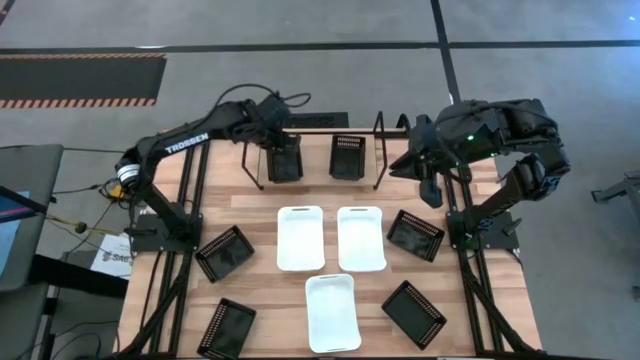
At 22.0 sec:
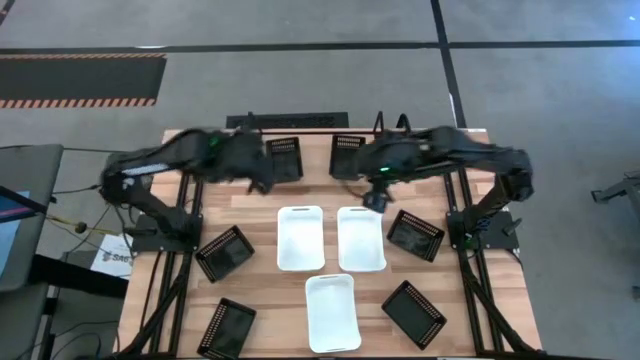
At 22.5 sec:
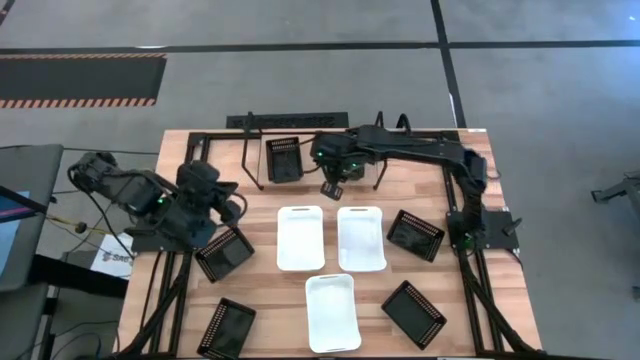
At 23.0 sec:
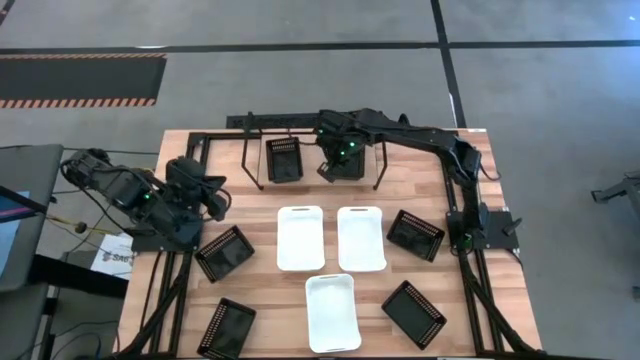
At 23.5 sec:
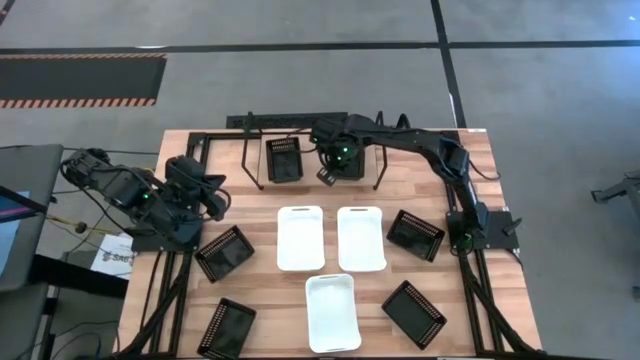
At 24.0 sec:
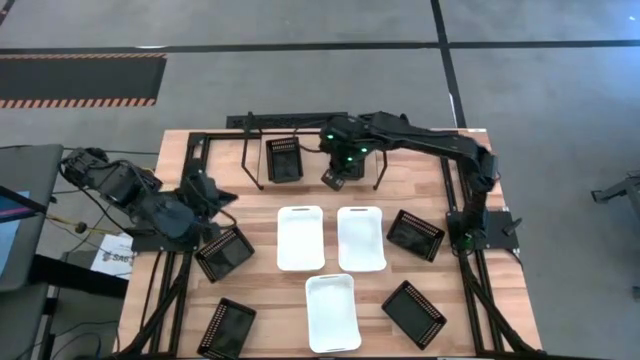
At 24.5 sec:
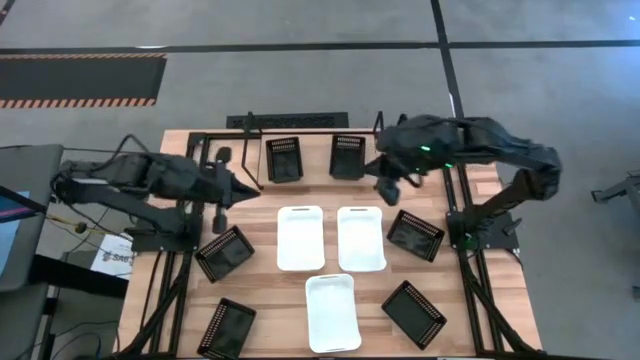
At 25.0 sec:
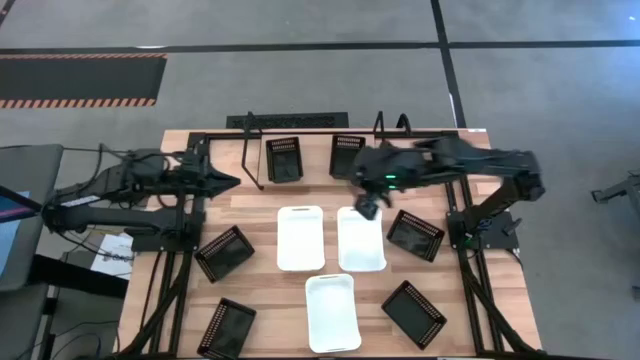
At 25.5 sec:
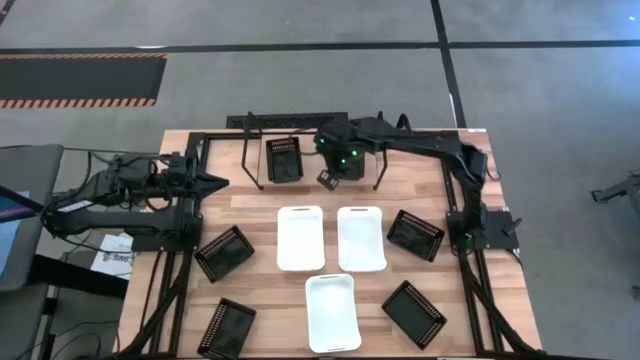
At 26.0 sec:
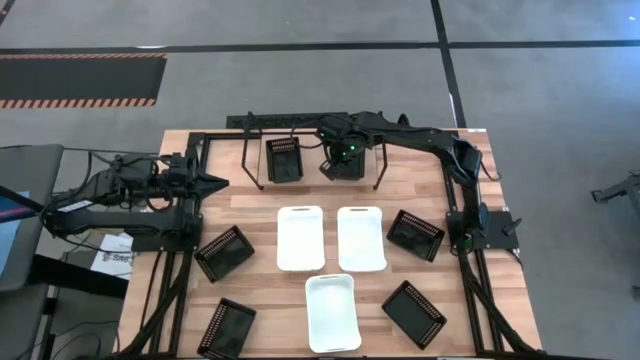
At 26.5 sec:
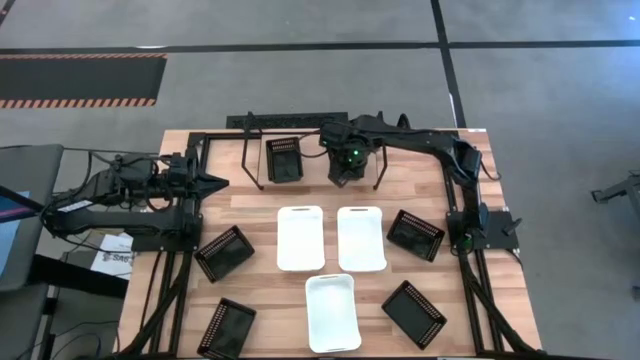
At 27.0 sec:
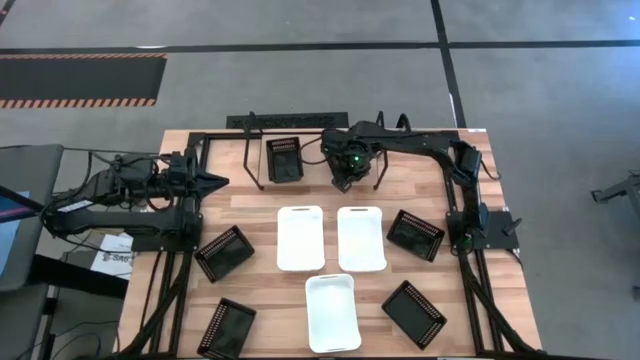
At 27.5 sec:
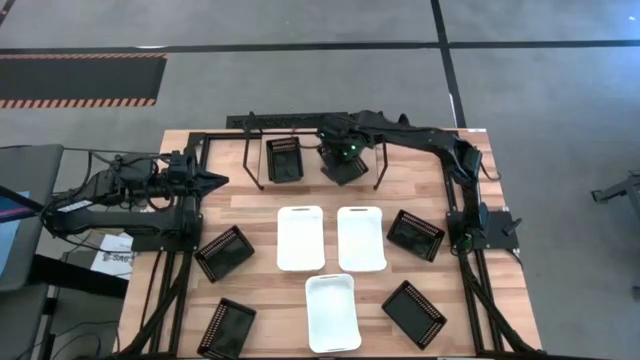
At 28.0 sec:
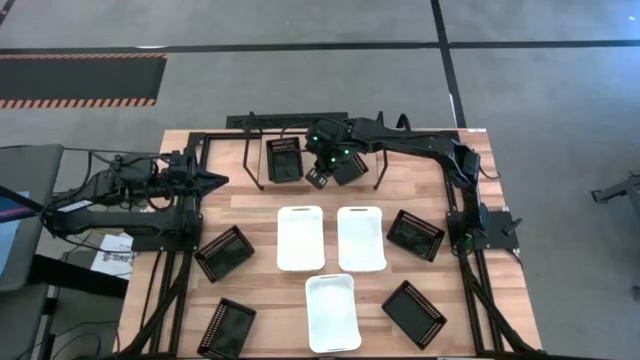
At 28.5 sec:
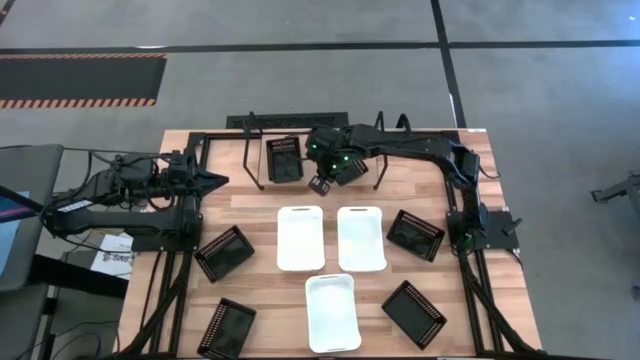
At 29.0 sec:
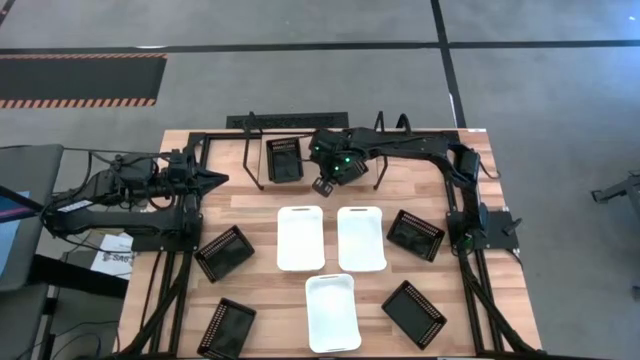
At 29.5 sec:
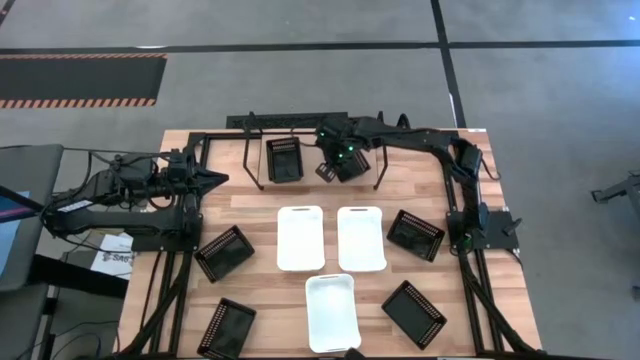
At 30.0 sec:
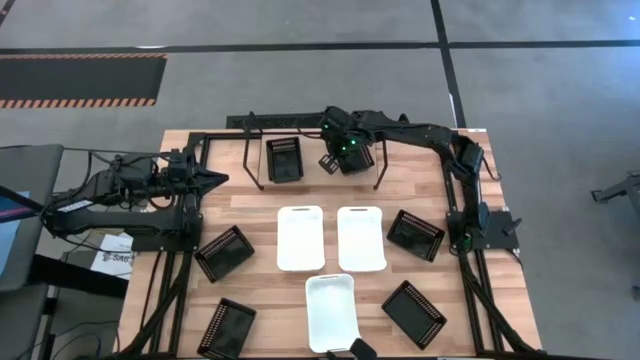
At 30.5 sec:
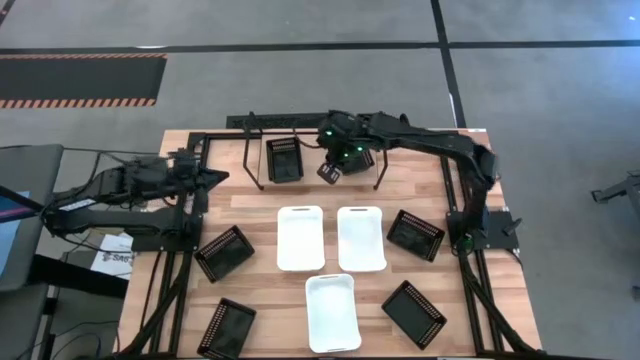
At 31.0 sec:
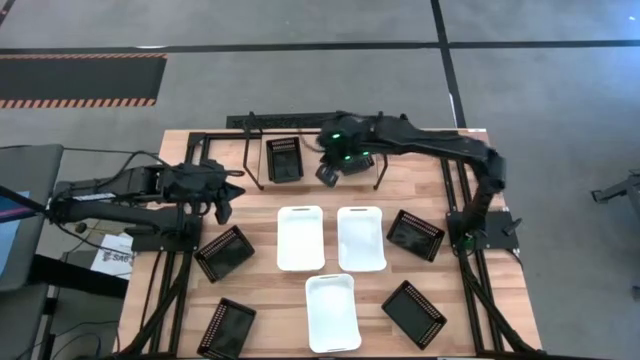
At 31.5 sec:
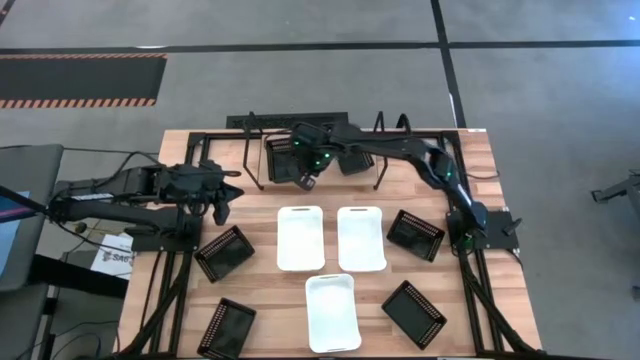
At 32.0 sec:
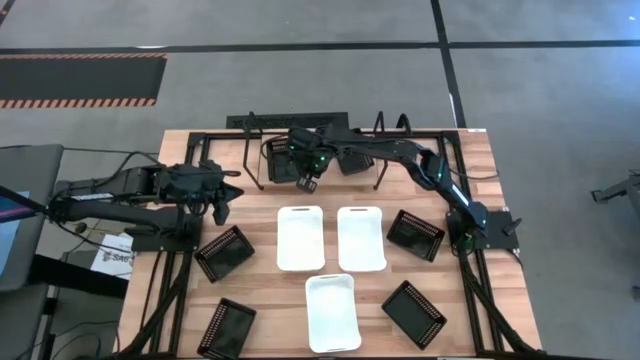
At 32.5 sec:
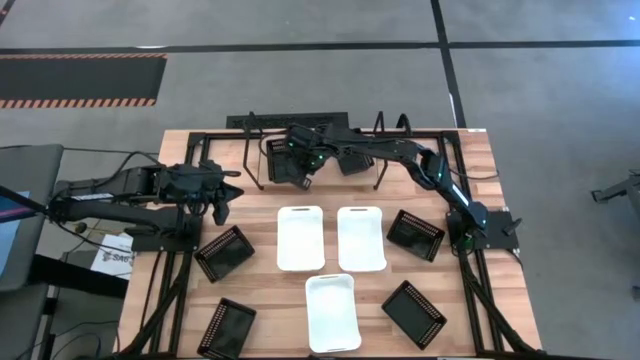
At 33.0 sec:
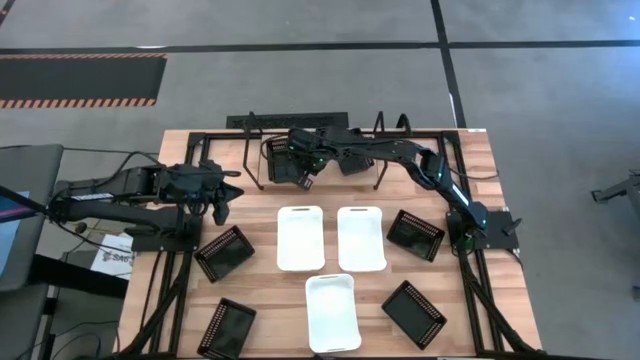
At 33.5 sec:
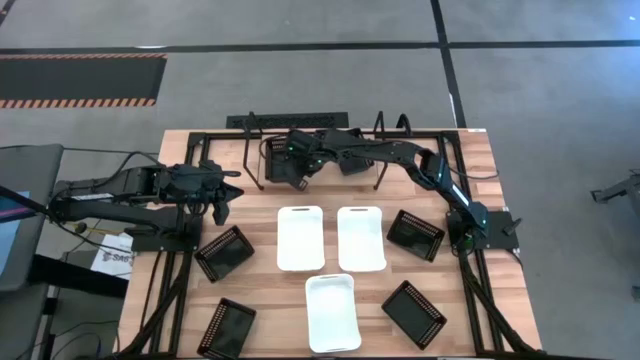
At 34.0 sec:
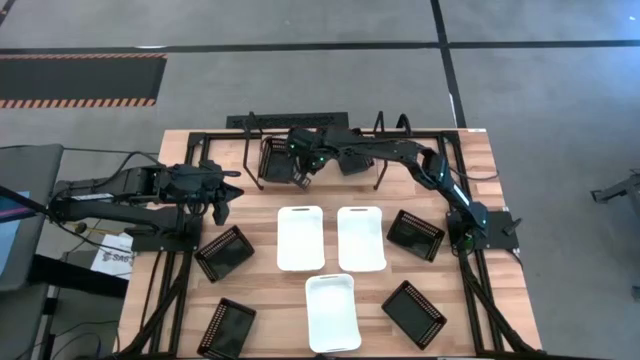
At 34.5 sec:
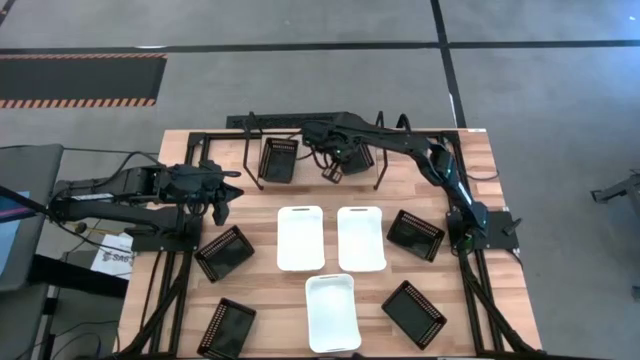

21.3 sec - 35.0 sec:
Task: Stack baskets on shelf by color
Adjust the black bins

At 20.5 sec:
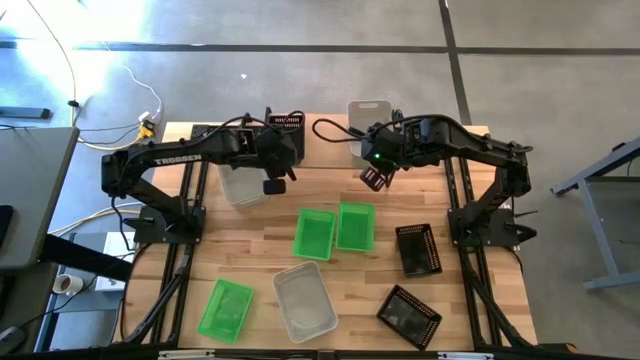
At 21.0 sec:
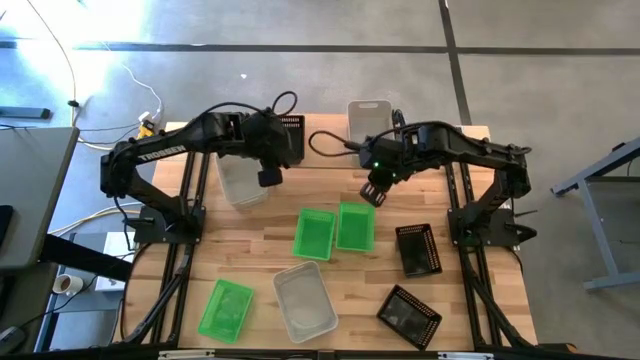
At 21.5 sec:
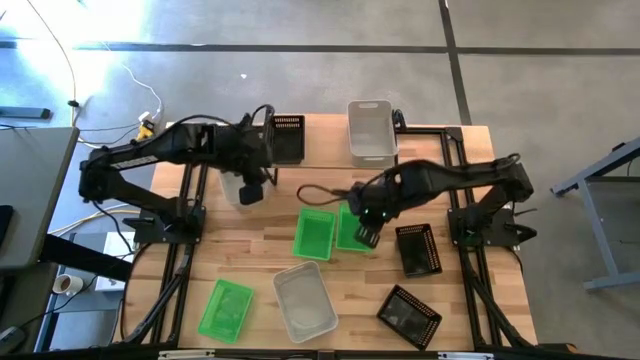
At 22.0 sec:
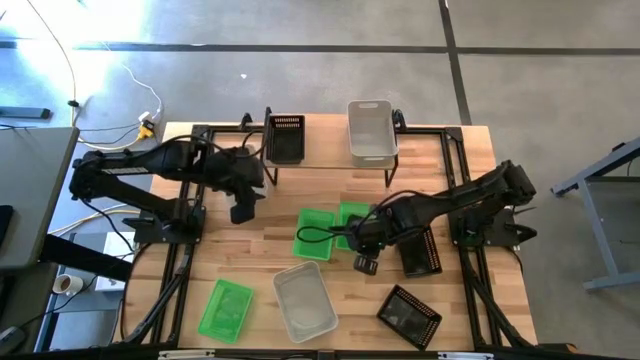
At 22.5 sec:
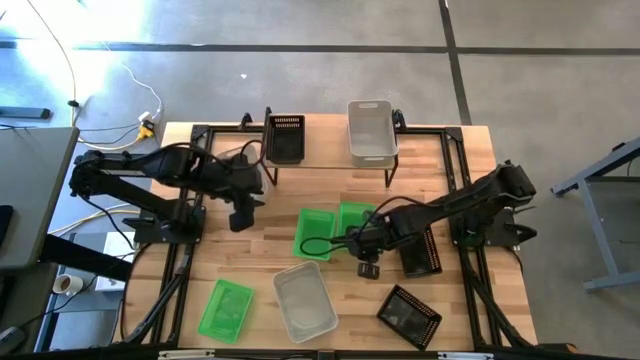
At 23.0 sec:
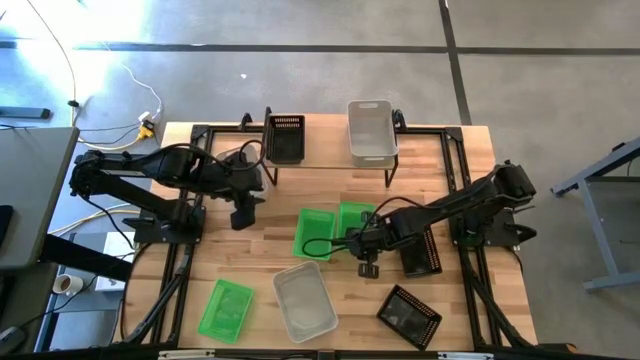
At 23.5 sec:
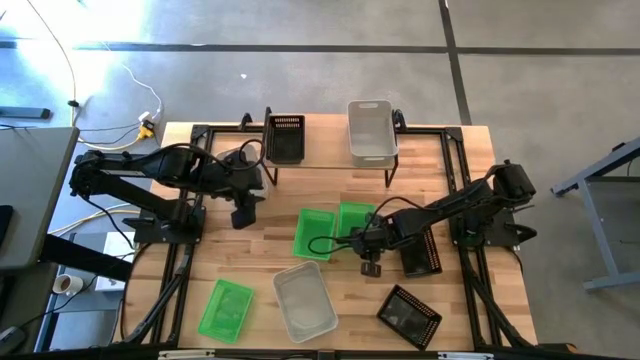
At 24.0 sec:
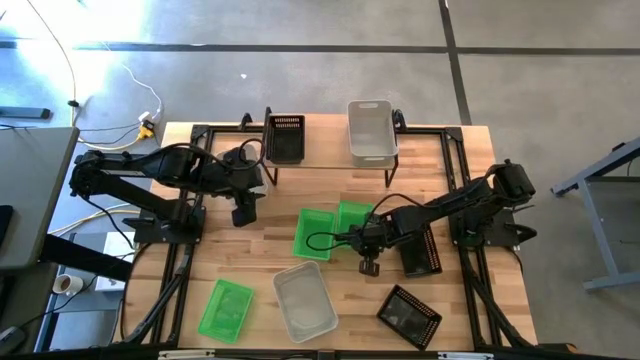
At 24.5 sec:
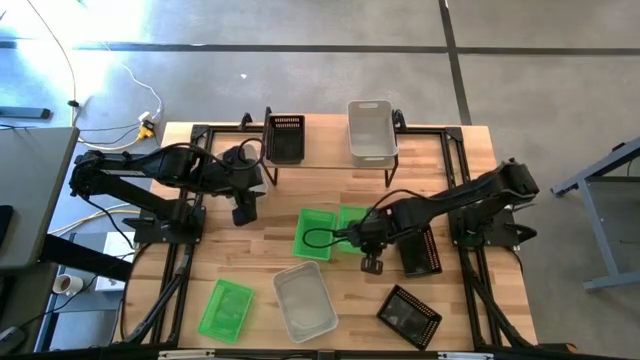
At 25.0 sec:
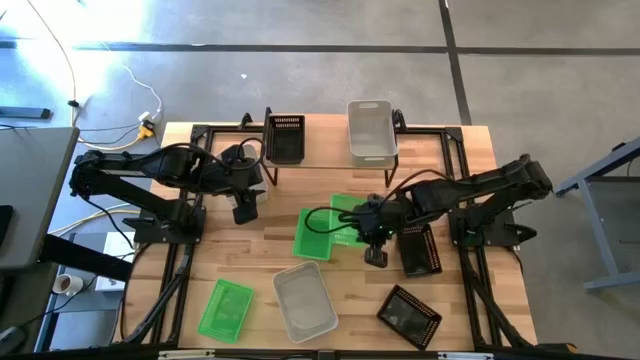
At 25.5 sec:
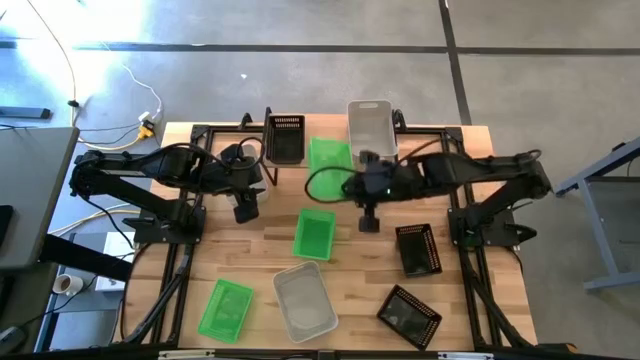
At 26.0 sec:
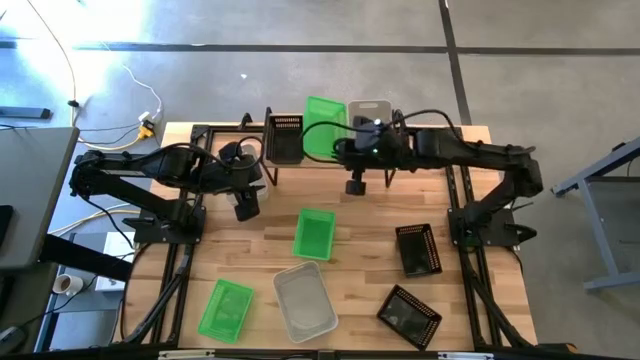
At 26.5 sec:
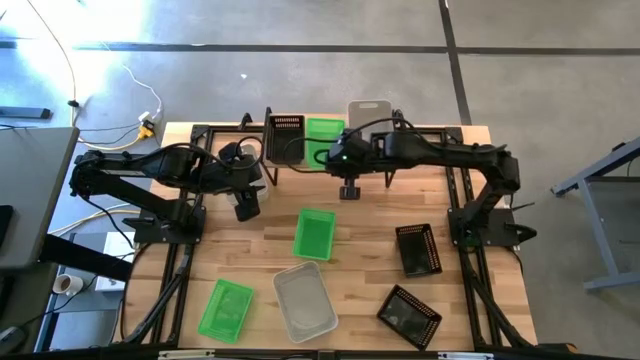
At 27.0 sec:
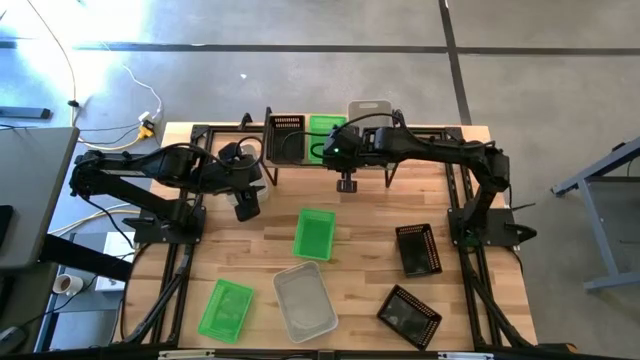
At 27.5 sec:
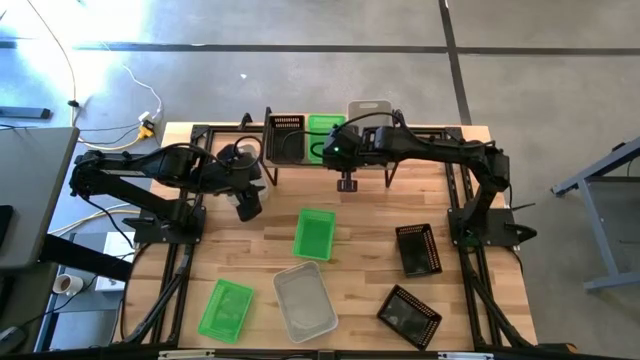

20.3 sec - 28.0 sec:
Task: Stack baskets on shelf by color
Put the top right green bin on the shelf
